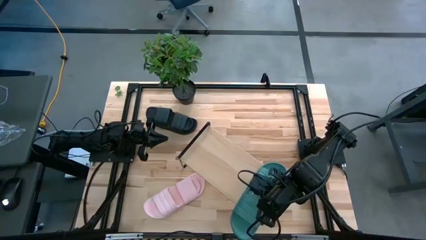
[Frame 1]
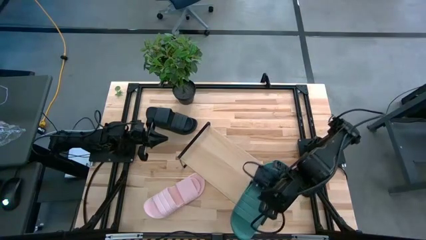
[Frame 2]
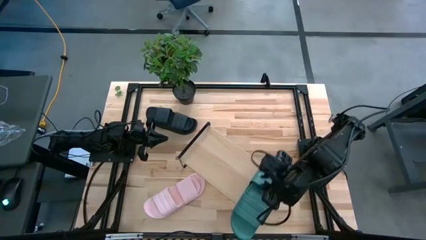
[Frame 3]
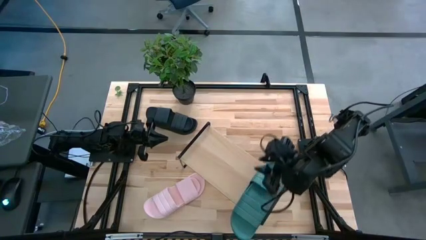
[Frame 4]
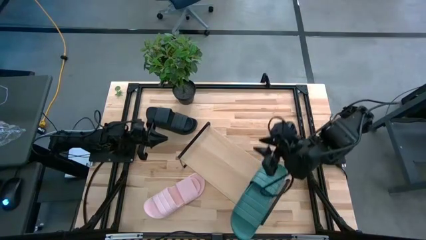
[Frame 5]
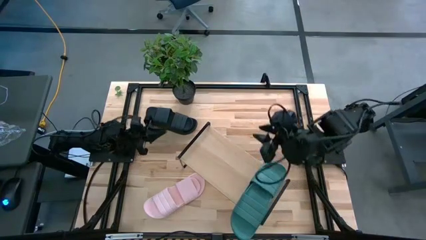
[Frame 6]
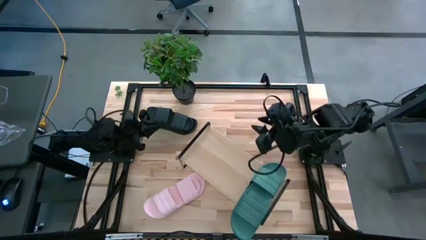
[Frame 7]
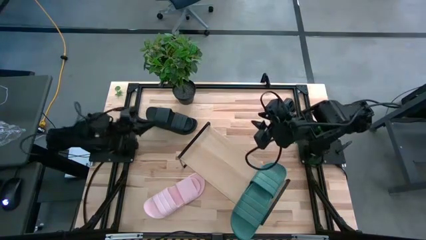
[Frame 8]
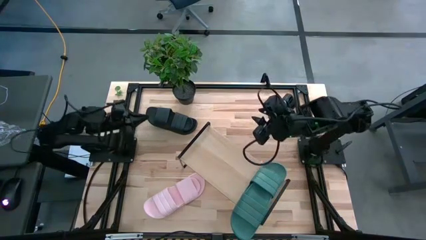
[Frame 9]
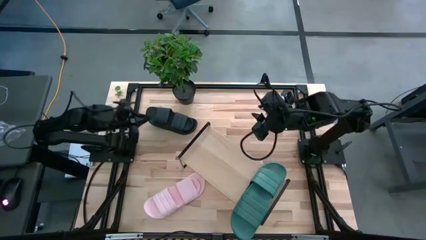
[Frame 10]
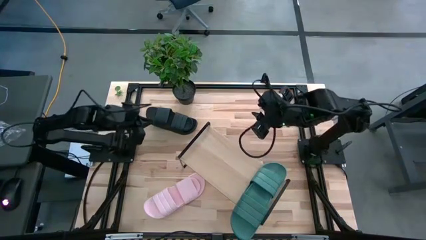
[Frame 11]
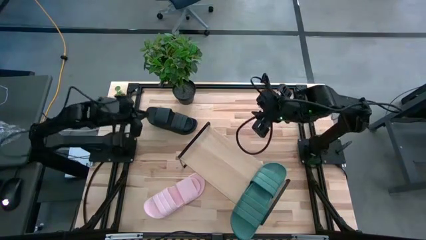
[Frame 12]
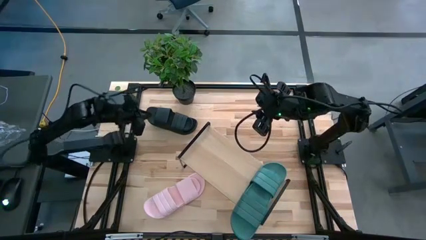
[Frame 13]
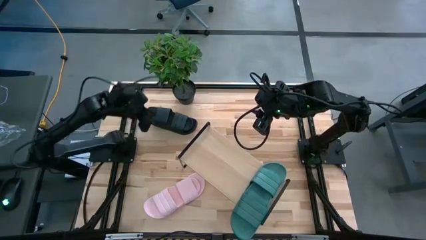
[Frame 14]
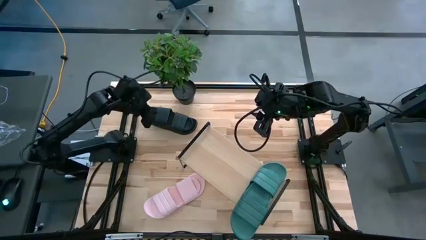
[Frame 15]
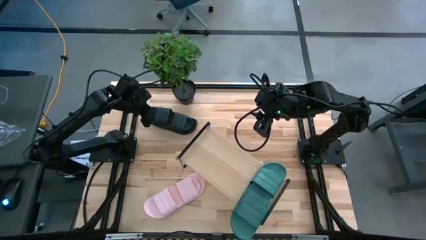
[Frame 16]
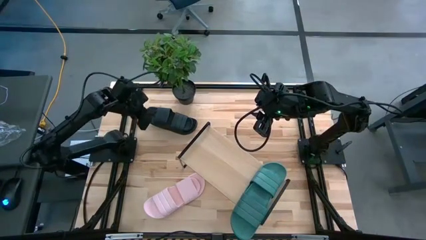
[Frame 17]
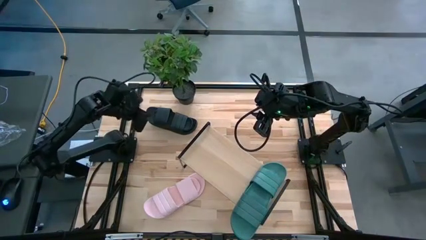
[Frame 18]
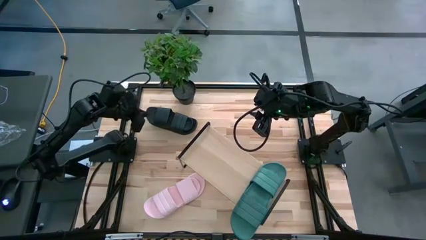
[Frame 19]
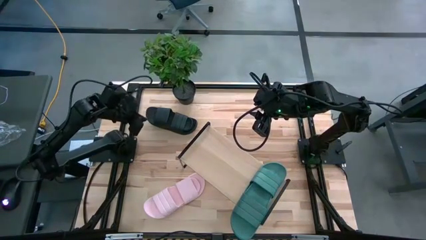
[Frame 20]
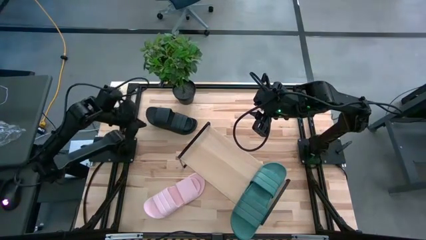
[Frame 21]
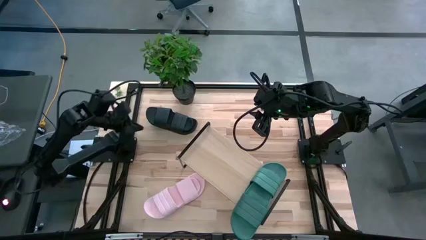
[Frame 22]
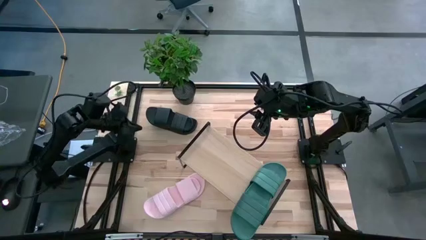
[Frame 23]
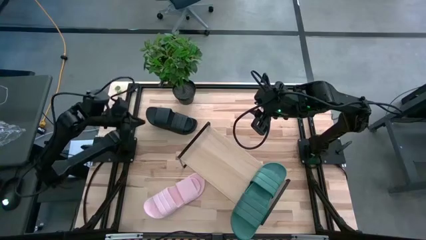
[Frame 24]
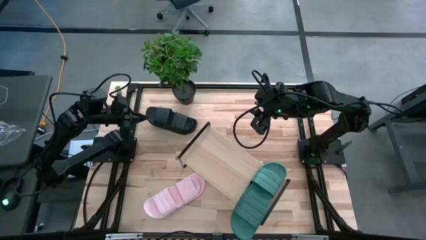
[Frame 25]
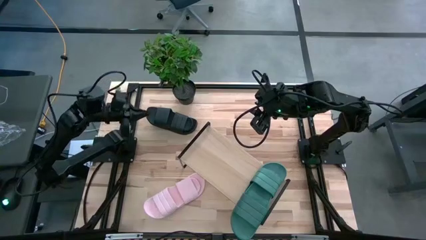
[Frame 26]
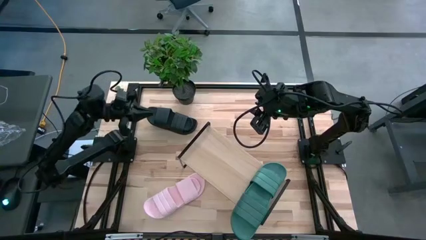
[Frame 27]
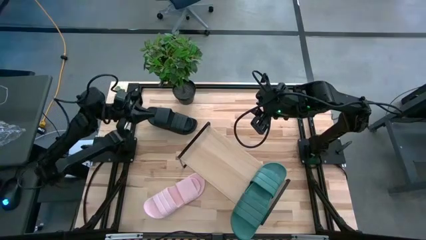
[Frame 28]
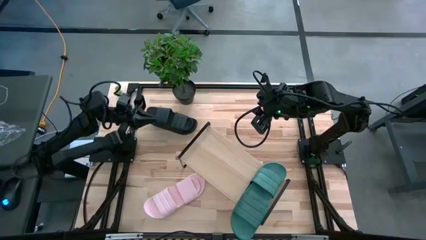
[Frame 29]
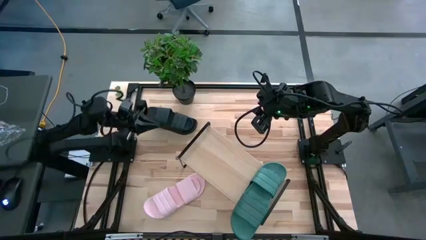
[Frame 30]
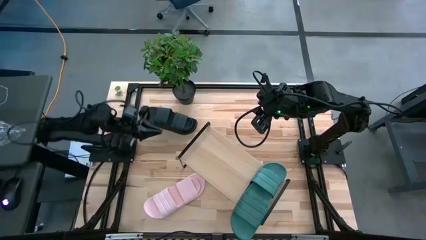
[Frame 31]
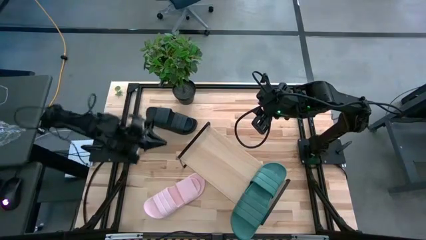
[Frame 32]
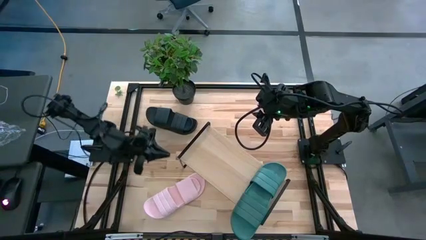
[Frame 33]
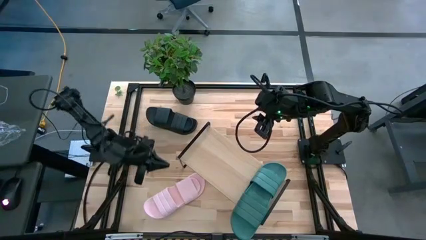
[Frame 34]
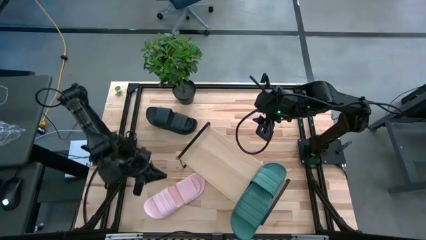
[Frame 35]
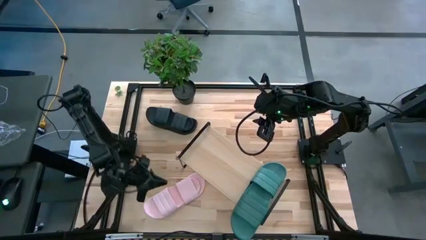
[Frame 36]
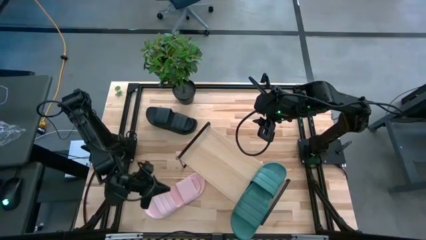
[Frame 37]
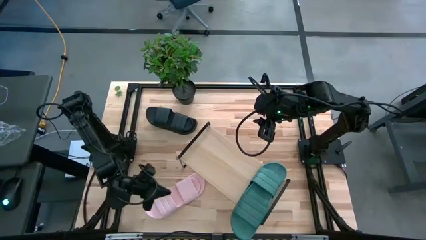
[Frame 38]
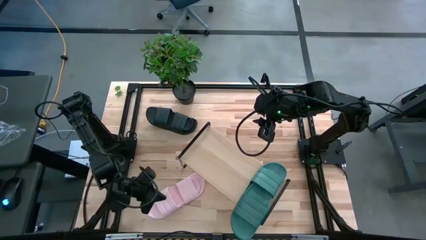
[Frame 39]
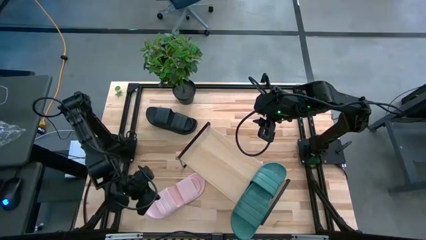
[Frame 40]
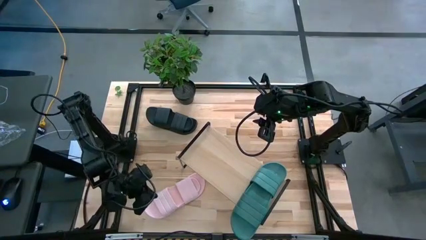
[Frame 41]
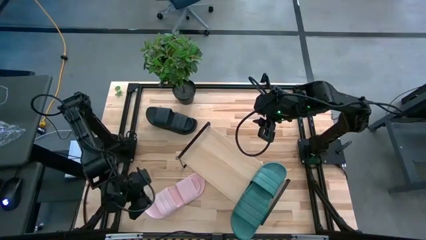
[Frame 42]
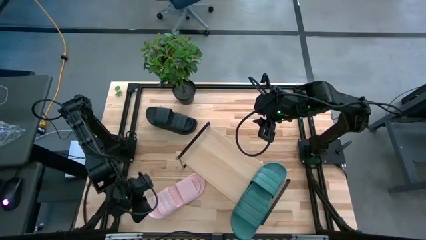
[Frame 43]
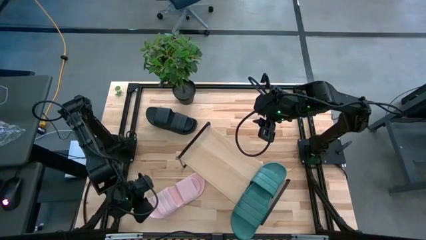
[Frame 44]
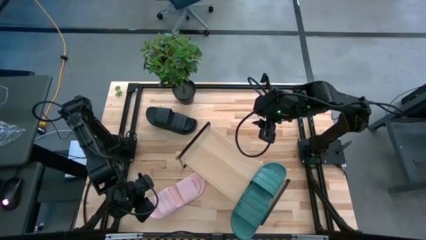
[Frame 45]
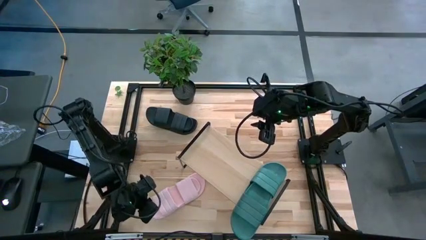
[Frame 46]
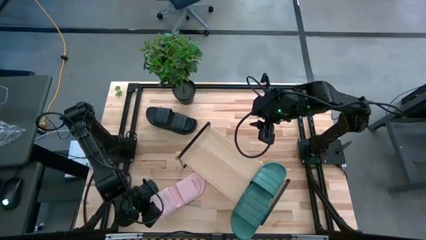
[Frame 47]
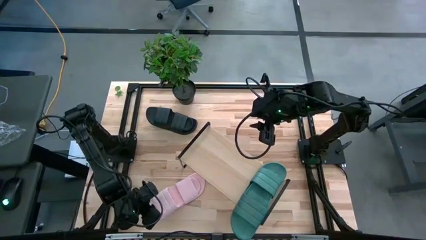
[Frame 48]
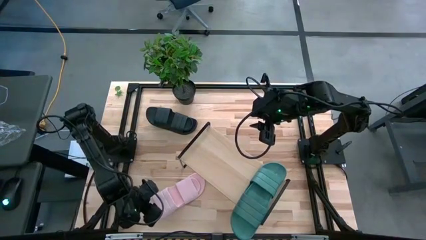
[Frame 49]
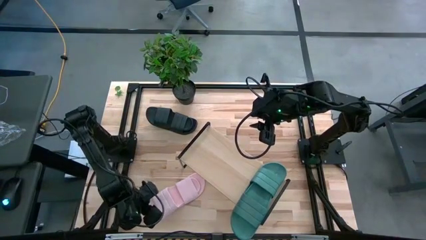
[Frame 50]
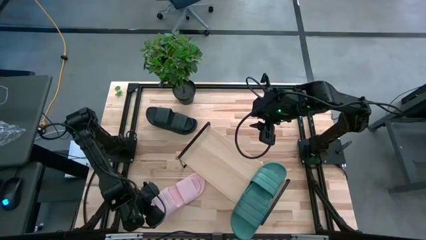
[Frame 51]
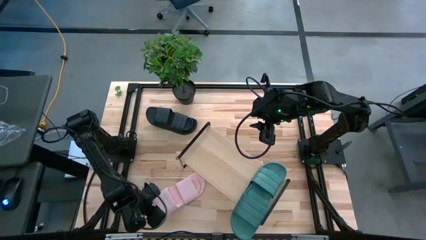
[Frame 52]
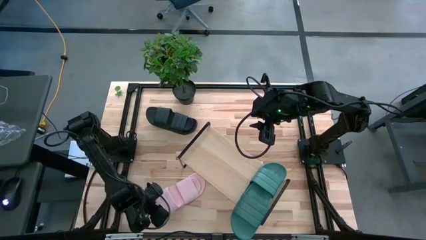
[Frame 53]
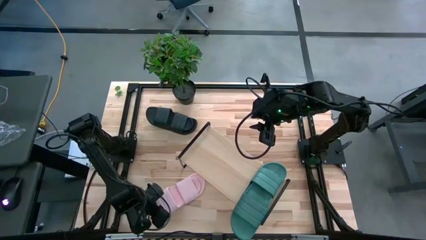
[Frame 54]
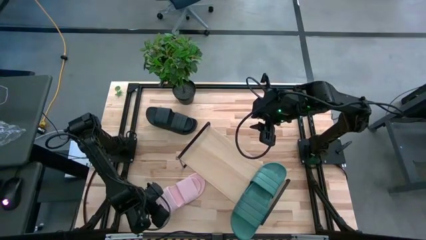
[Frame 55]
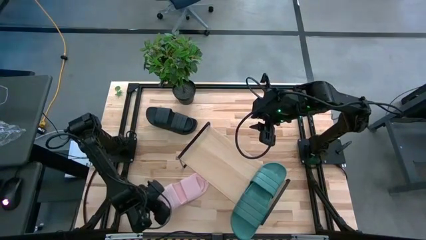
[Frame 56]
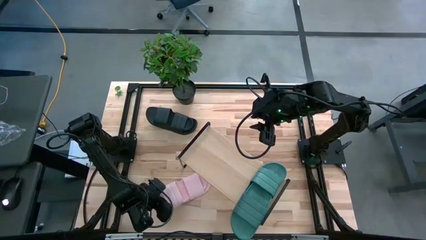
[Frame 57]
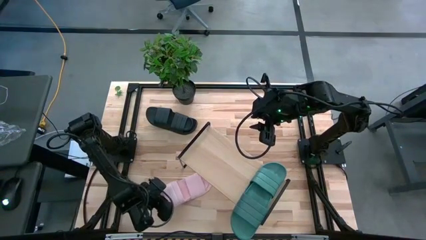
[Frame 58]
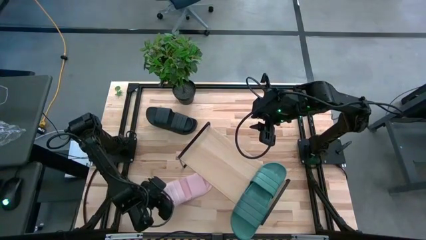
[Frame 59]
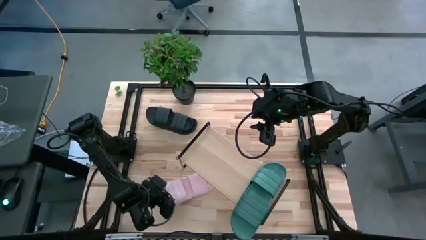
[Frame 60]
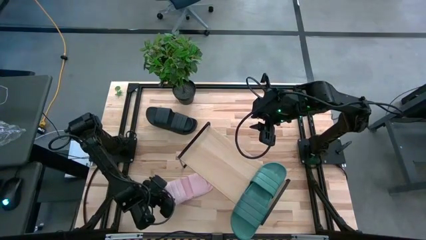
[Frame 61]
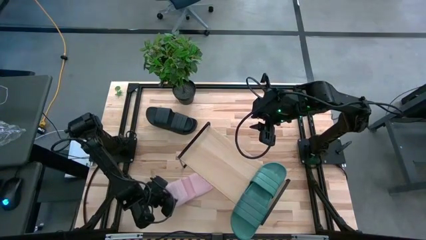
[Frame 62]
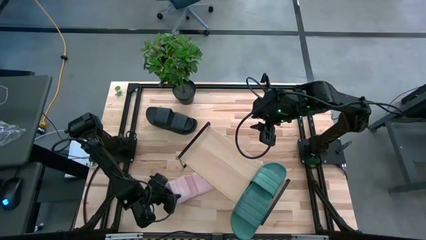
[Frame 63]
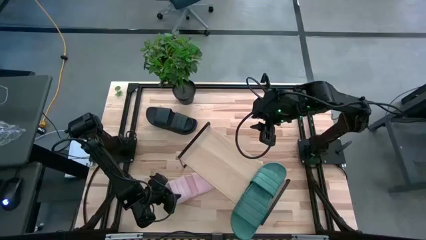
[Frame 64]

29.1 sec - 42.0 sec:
Task: Pick and place slides into the shelf
Put the pink pair of slides on the shelf

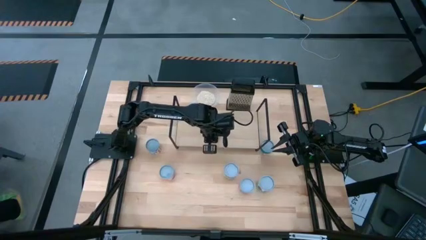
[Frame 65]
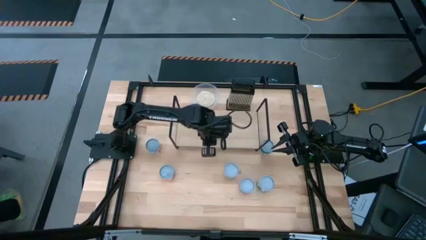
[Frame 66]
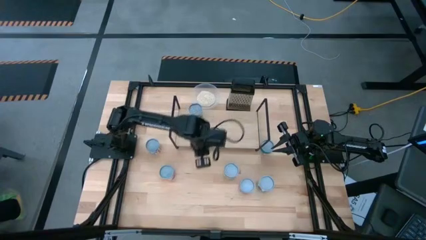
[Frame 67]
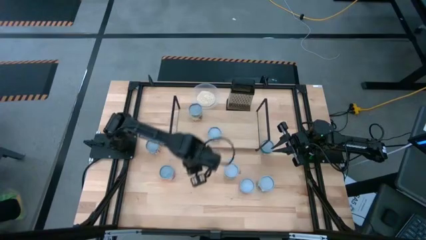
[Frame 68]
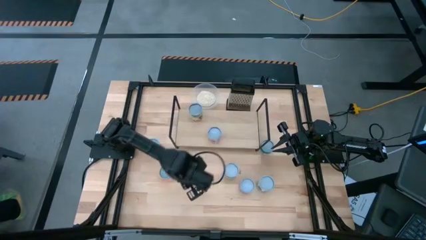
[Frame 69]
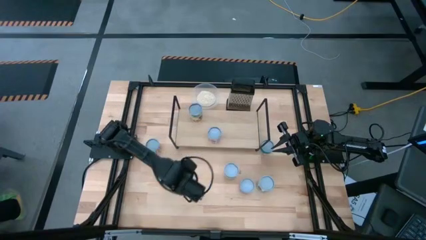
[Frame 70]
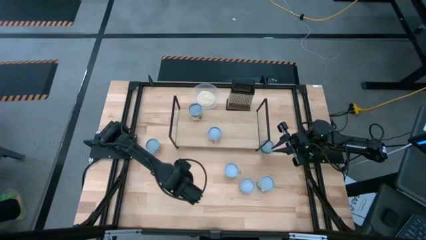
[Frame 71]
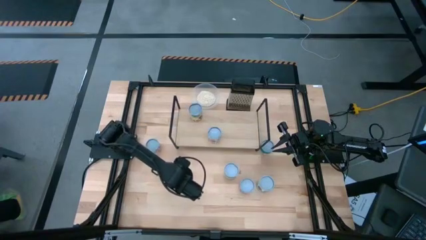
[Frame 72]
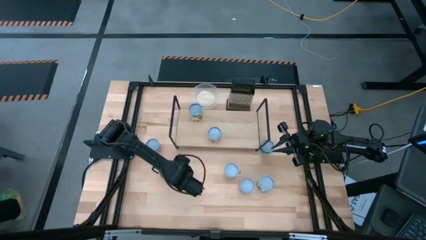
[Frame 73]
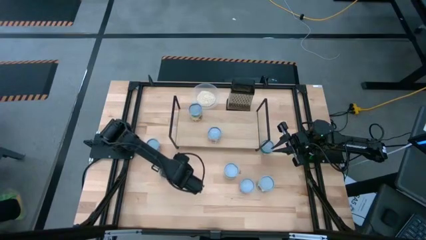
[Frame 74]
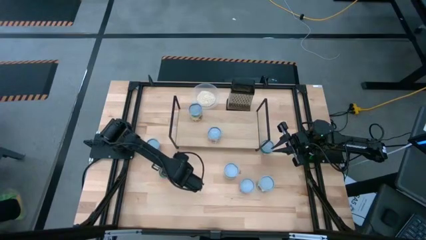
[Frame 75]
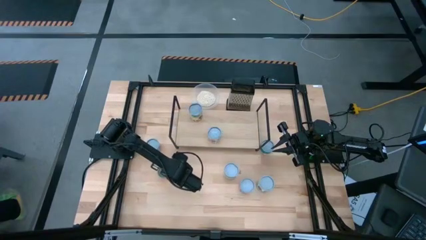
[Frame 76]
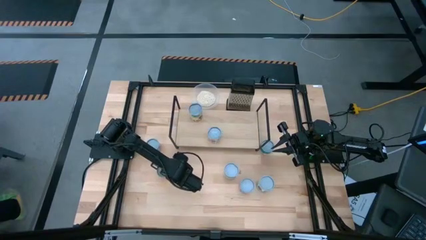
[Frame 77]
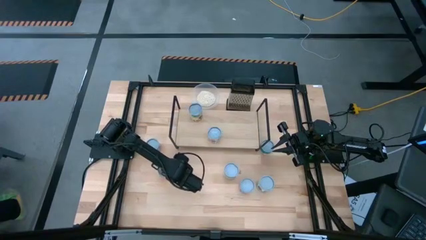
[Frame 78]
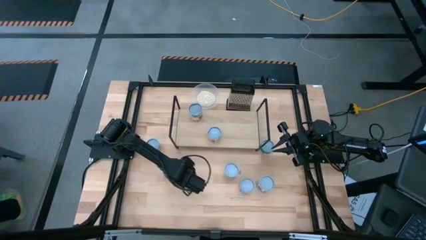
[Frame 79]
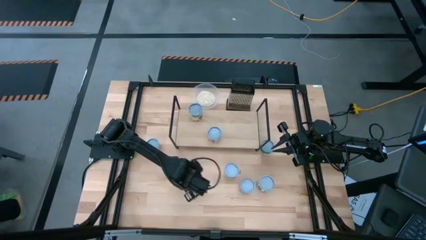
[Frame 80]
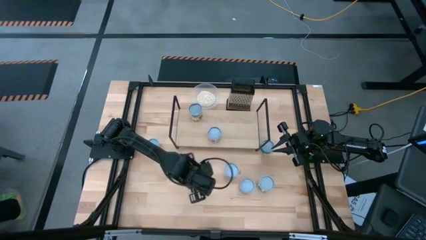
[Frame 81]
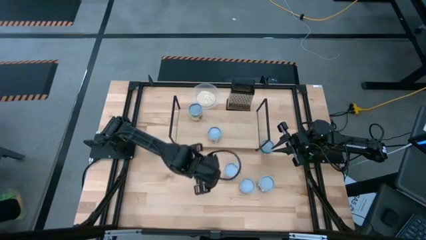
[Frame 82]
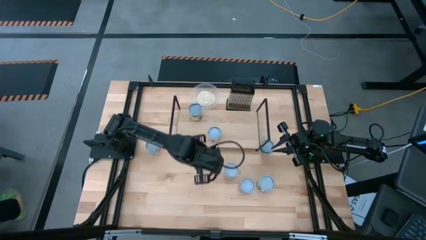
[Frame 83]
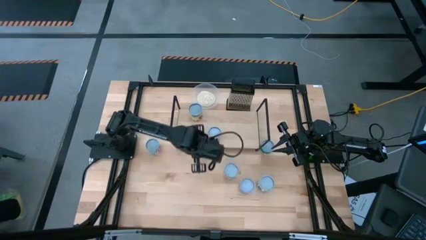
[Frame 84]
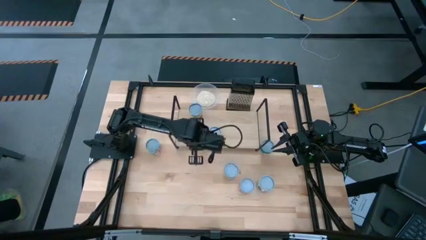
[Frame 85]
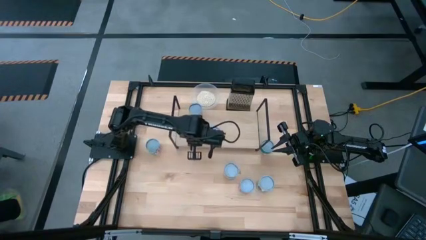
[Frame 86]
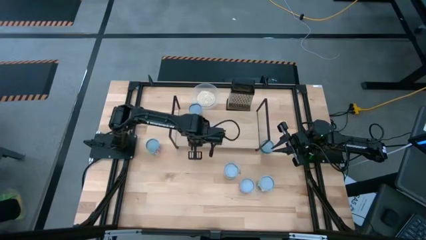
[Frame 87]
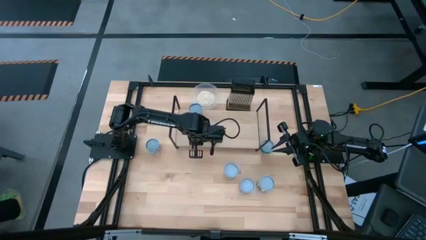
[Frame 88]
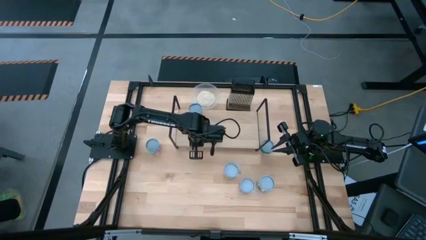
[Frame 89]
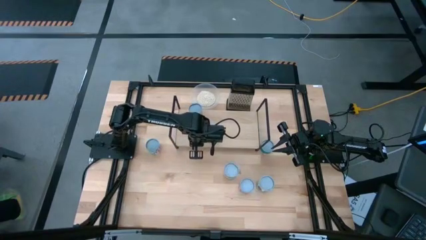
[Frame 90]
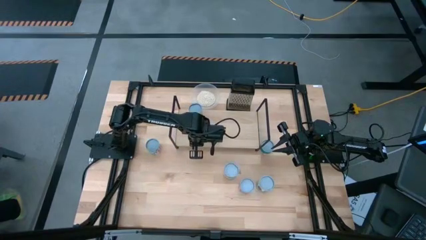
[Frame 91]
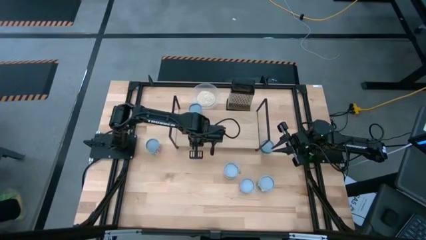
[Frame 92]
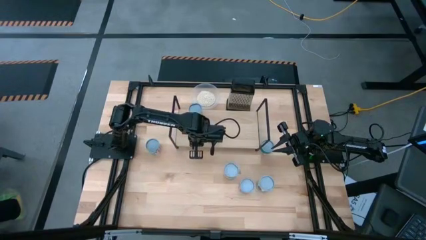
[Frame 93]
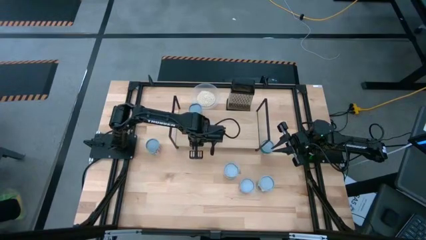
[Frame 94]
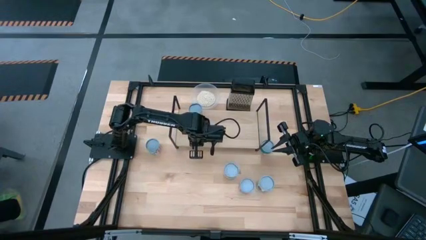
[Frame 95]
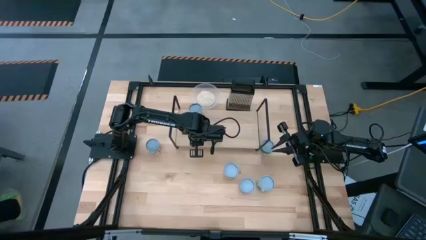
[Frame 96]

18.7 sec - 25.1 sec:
Task: Pick and place cans onto a shelf
Put the canned meatballs on the shelf
